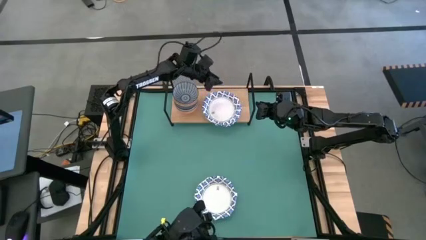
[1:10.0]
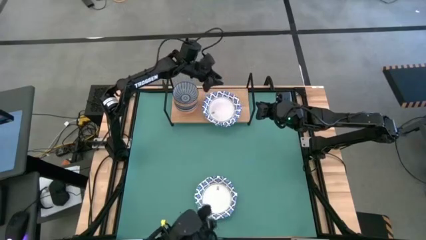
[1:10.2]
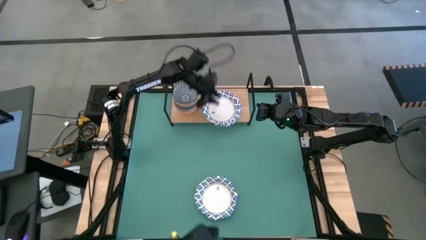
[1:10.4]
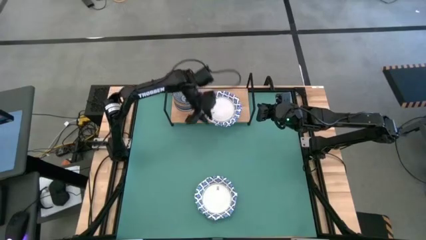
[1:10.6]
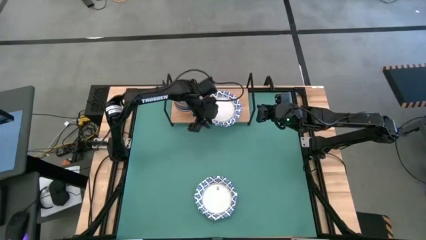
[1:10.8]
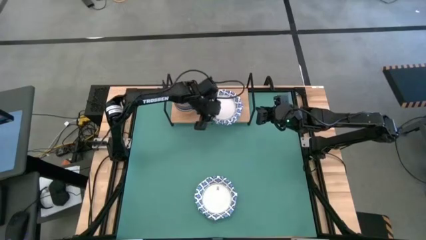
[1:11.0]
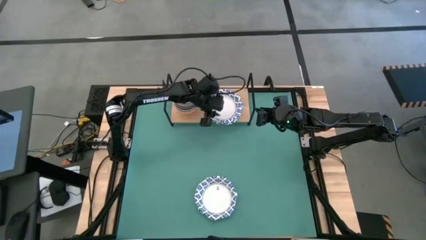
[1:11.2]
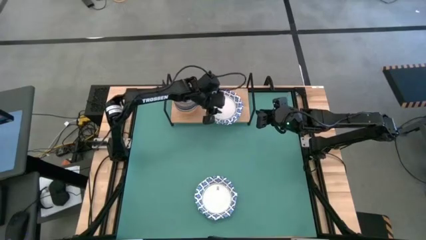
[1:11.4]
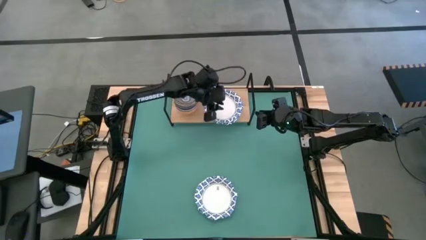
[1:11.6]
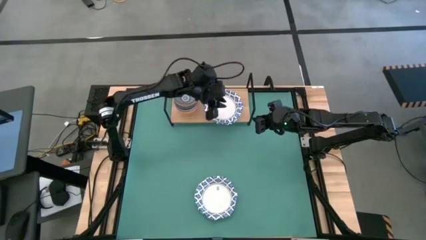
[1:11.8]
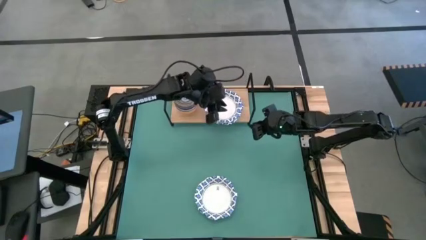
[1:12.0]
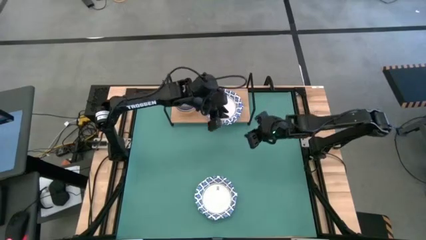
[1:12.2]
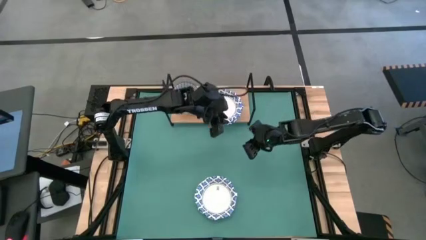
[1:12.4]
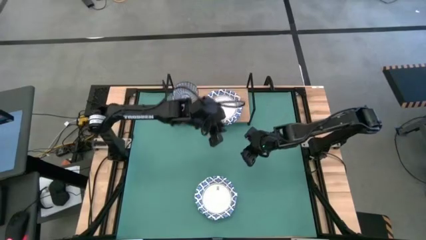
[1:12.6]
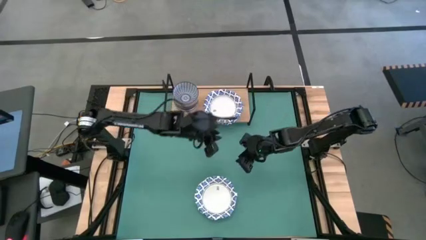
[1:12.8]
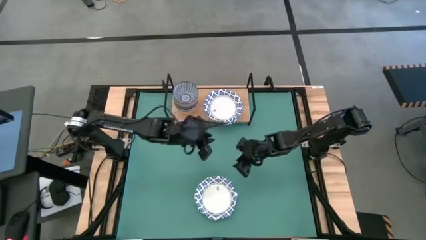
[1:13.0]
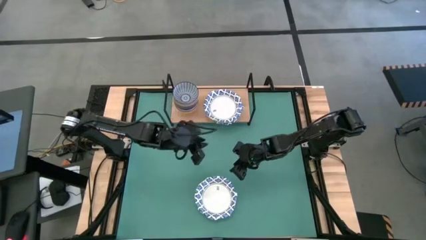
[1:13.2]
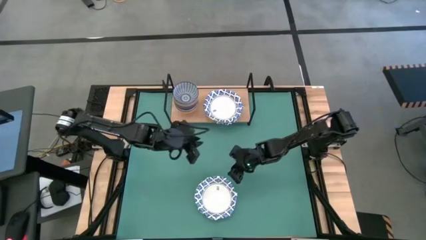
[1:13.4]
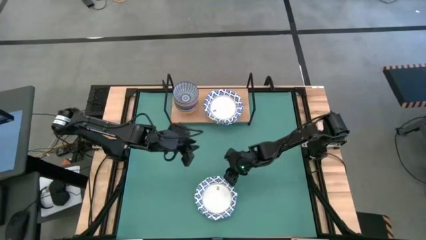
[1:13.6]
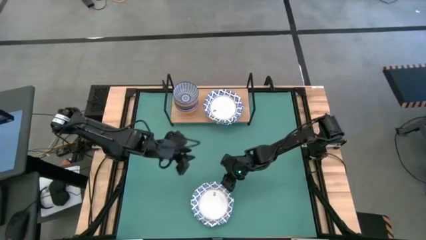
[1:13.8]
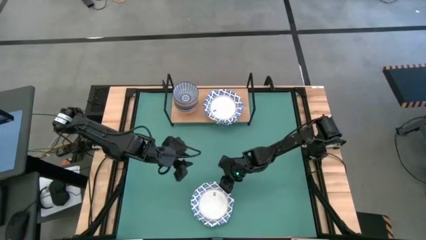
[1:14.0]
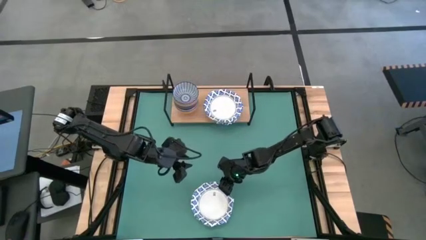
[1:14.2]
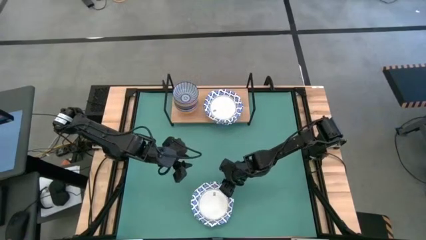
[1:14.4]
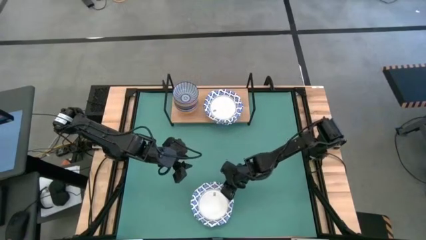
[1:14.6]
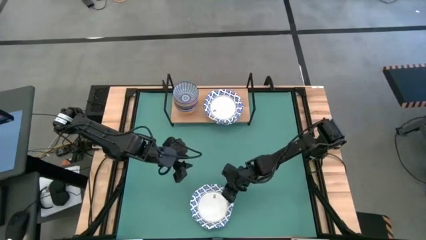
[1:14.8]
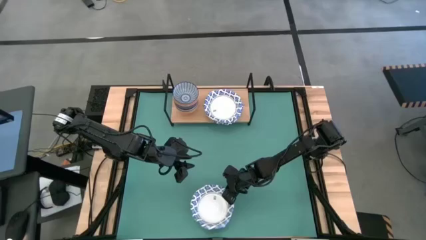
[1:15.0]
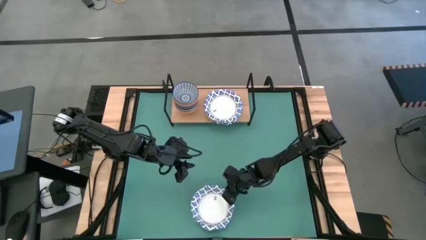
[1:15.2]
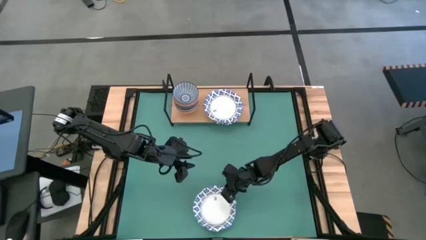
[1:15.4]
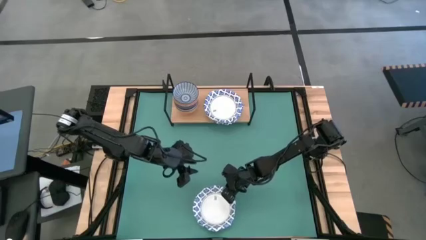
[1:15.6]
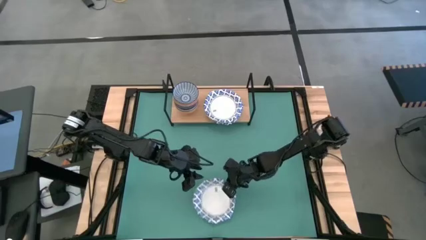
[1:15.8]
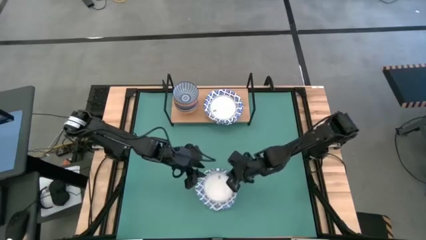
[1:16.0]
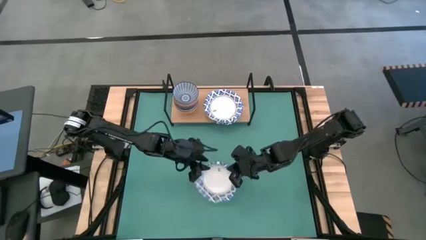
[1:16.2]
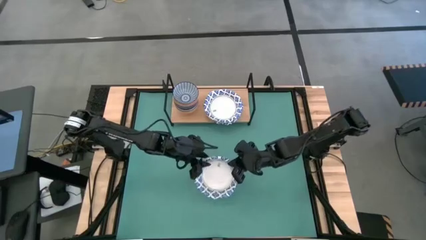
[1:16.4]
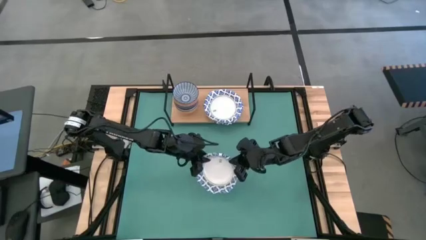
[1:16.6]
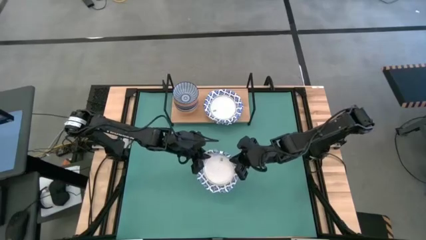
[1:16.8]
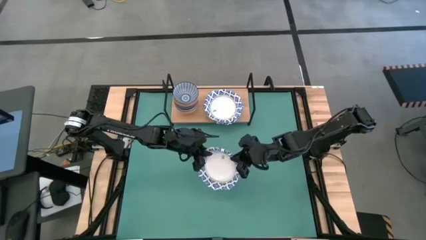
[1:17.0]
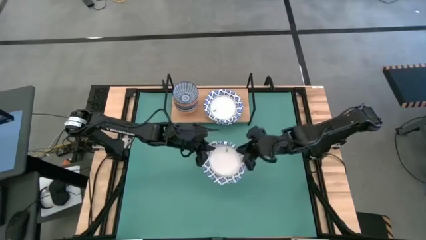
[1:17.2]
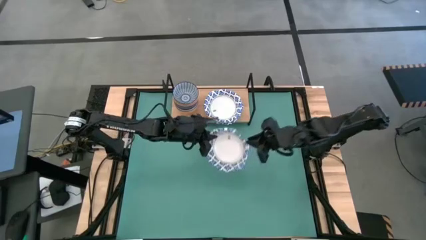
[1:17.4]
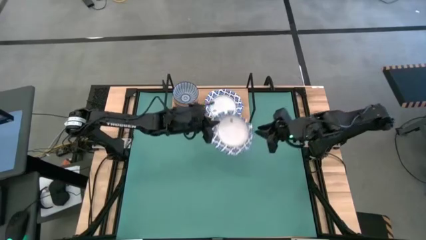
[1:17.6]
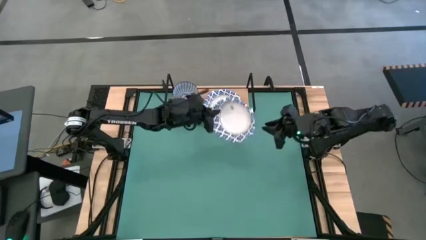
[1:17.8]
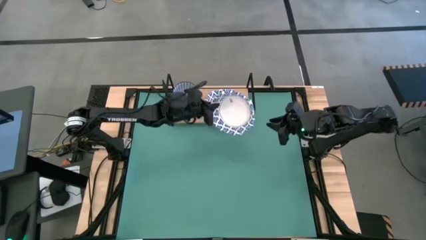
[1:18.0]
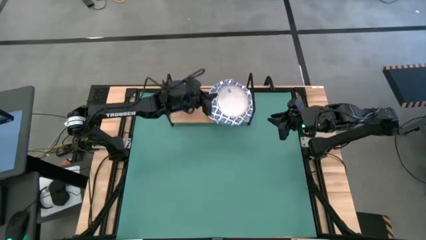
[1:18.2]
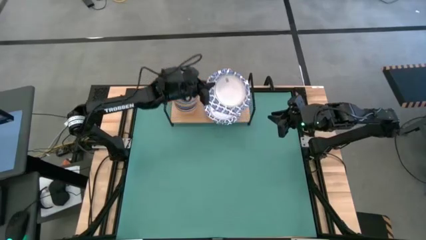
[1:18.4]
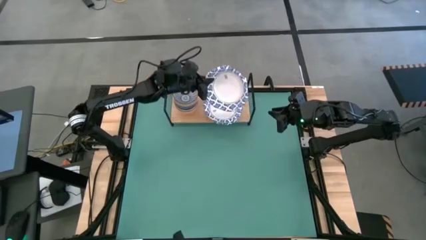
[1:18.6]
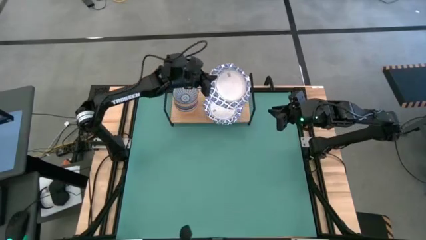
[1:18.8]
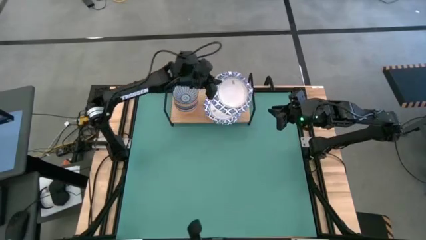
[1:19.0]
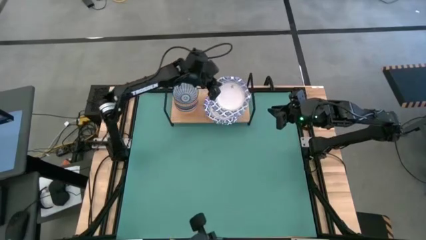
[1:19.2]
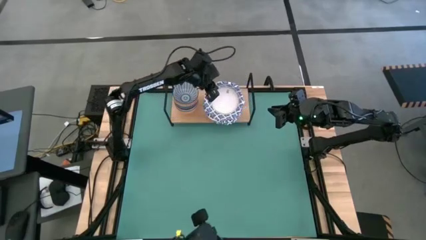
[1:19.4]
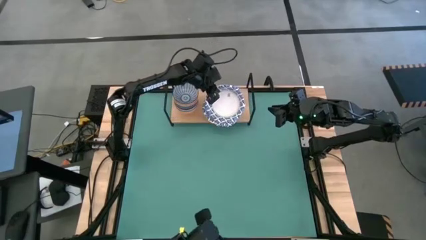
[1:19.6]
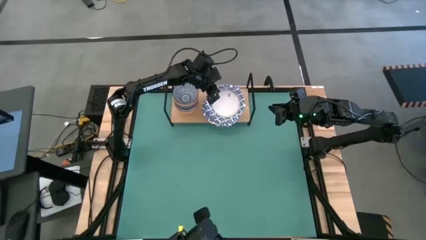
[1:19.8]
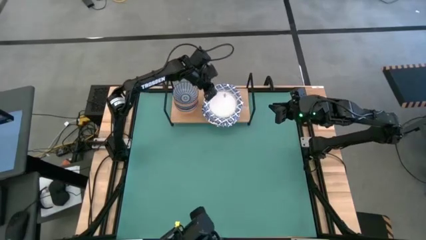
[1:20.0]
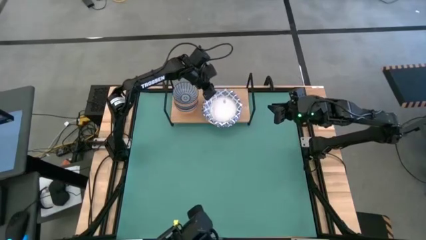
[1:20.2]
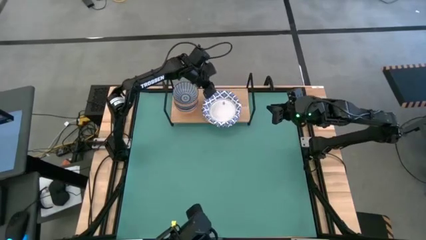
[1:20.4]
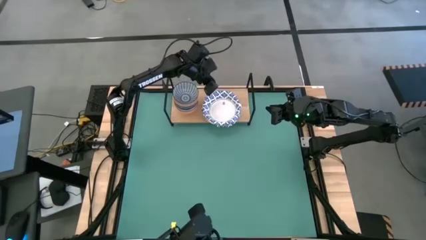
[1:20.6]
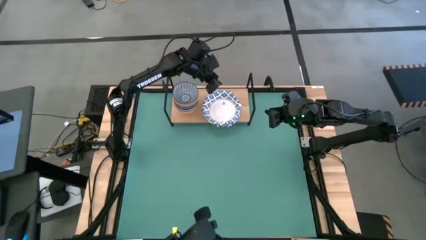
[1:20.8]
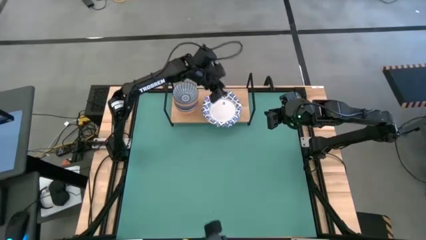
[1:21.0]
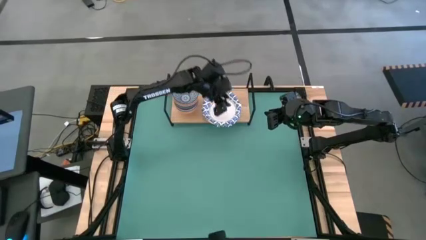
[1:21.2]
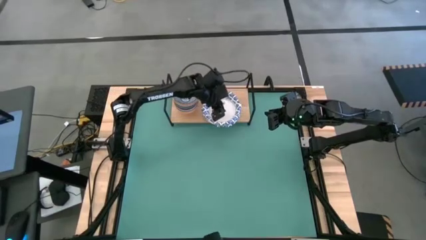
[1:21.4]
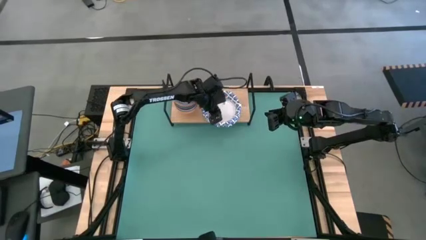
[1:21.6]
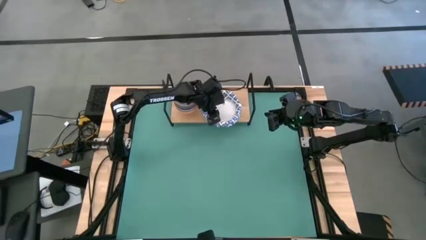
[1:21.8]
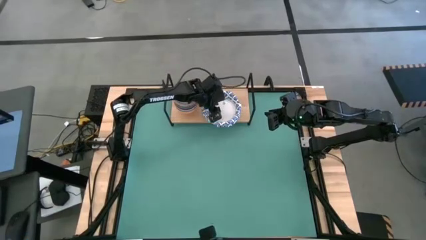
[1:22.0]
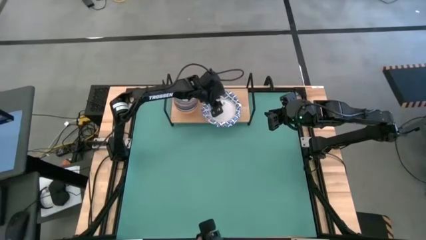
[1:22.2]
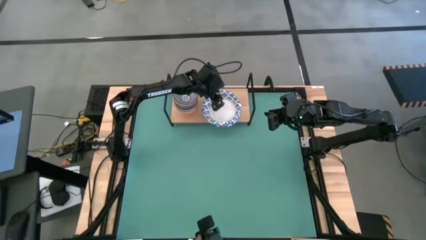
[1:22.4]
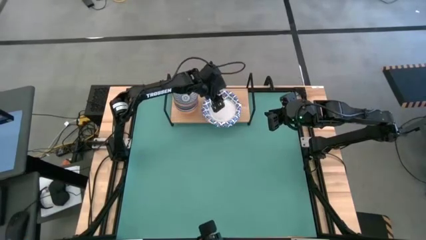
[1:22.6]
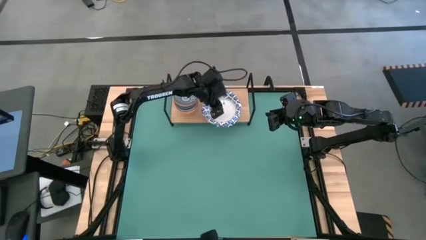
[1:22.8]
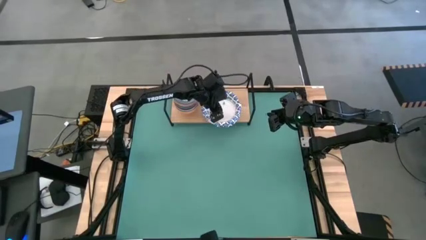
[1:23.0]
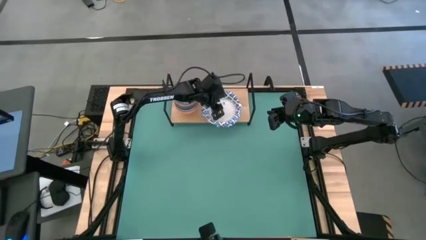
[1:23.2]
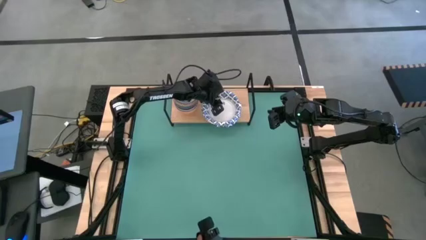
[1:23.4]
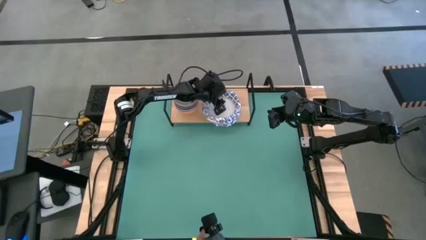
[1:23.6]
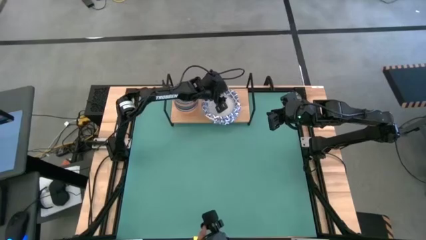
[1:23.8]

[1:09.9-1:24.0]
Task: Place and stack bowls onto a shelf
Stack the patterned bowl on top of the stacked white patterned bowls on the shelf

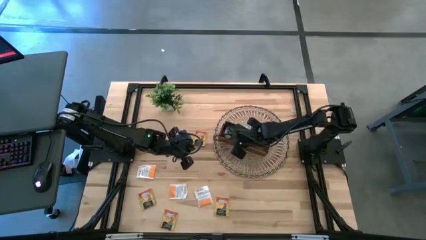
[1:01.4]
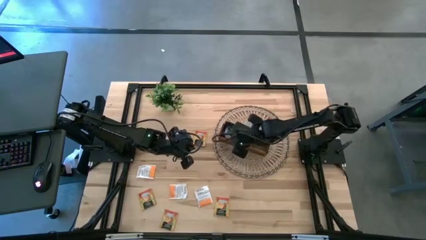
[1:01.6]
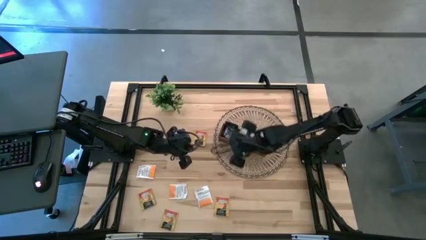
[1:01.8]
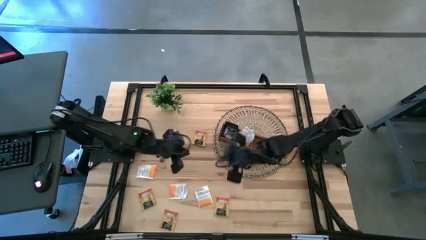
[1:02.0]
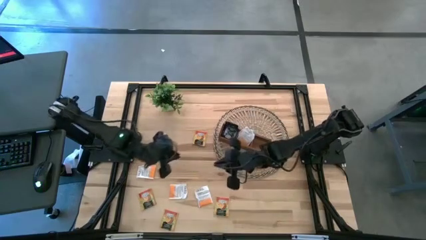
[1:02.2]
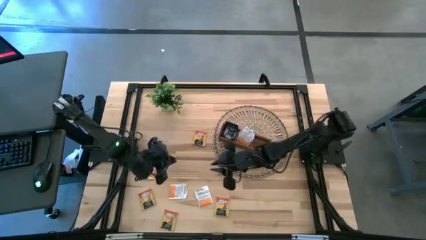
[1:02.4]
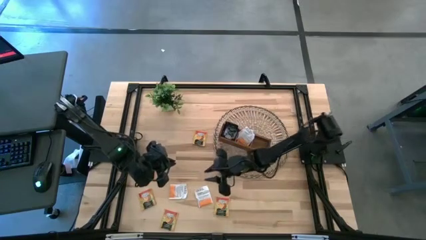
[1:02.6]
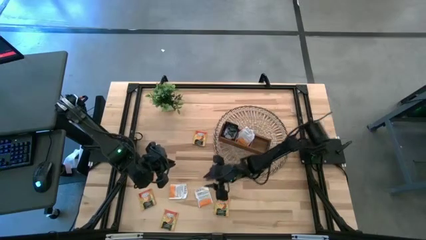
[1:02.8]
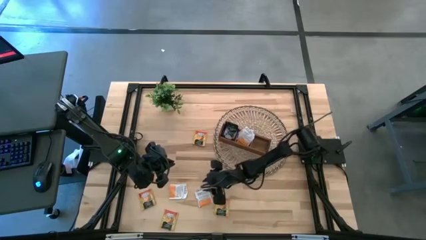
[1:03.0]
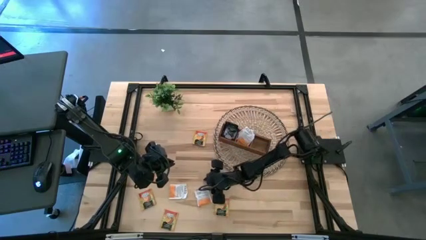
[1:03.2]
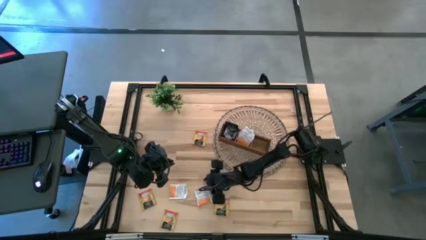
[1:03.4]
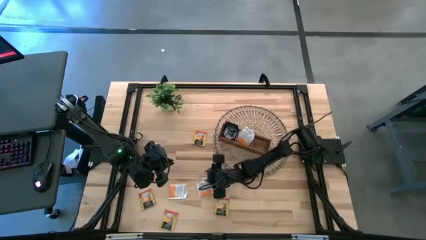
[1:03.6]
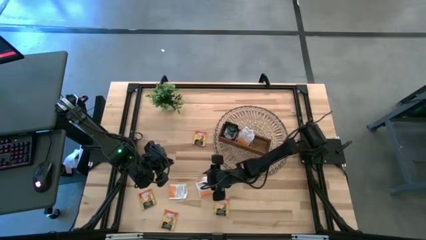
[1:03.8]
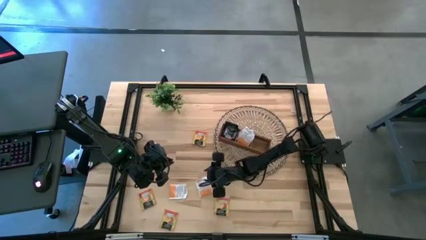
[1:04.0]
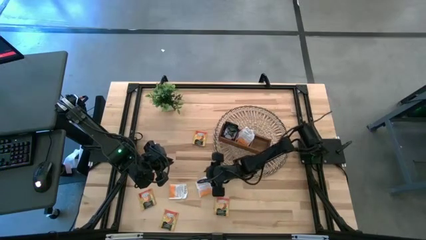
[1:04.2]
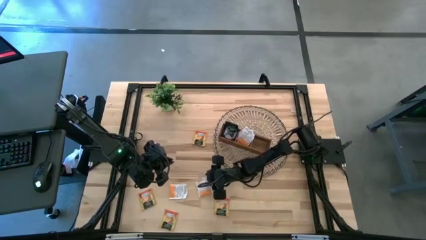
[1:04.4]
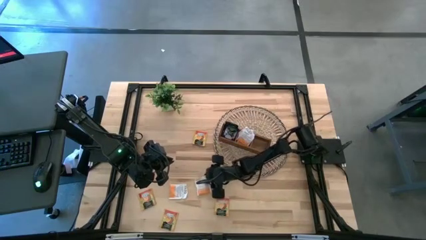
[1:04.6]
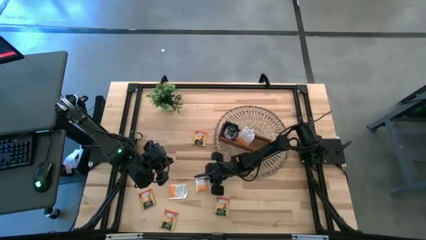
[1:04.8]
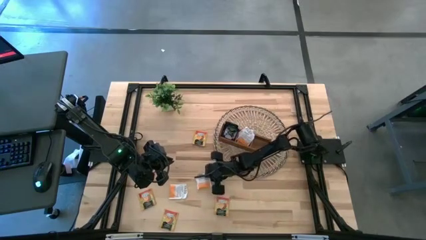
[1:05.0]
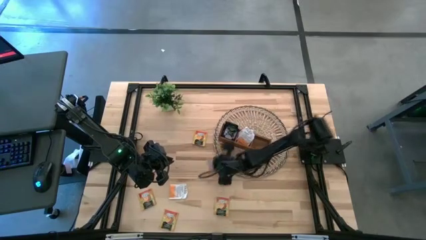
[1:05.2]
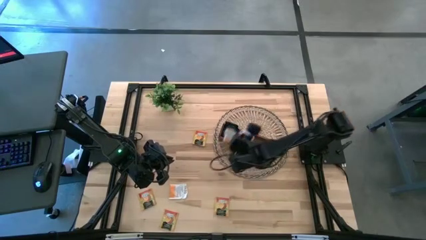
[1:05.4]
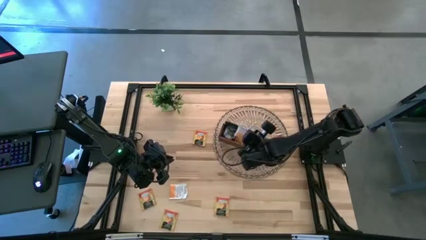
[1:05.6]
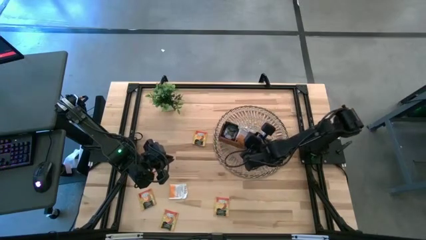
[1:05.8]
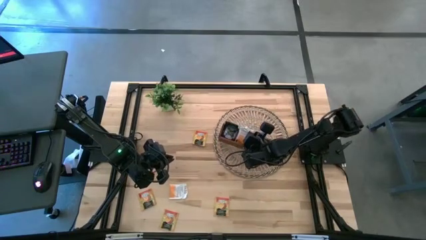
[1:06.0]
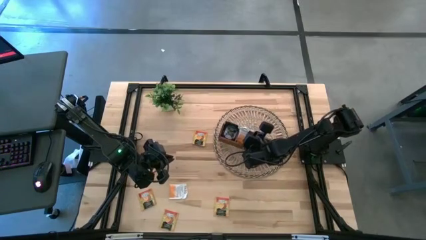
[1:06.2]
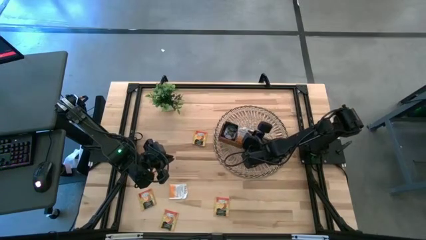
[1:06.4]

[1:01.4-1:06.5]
Task: Pick & Place Tea
Put the white tea bag into the middle section of the wooden organizer
